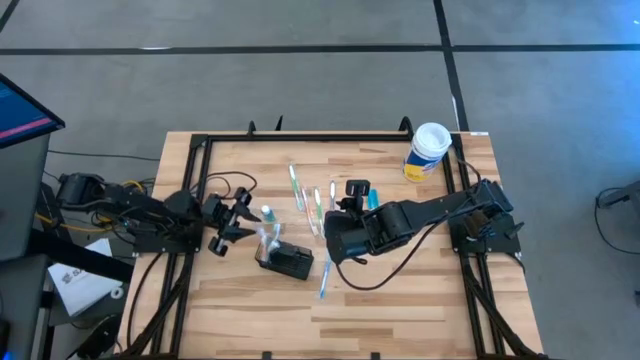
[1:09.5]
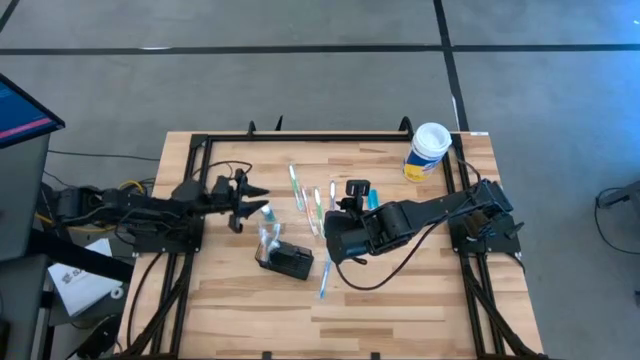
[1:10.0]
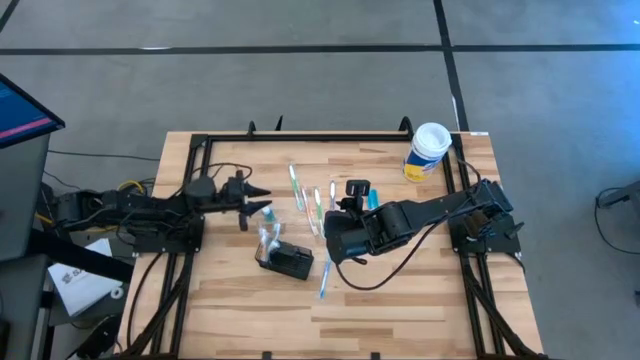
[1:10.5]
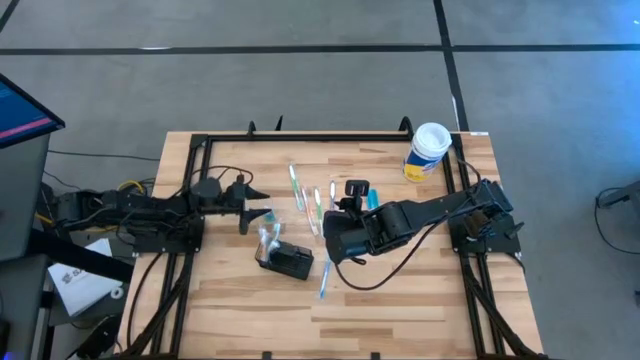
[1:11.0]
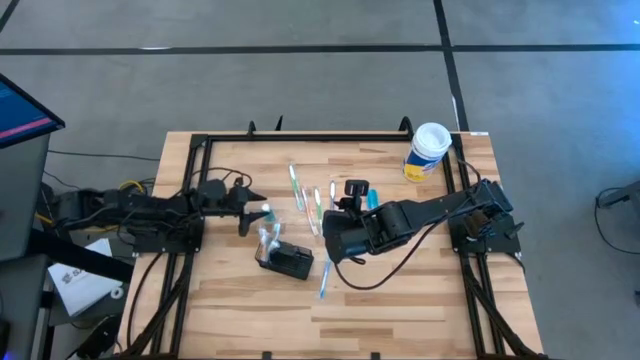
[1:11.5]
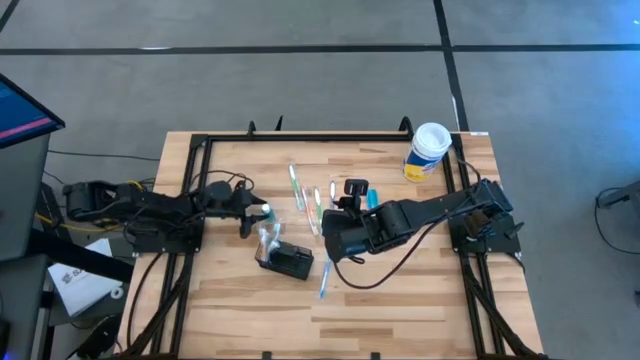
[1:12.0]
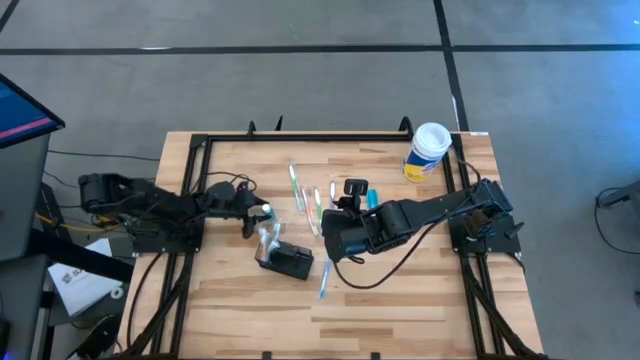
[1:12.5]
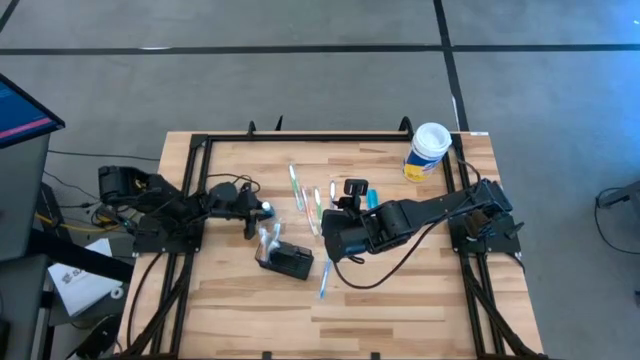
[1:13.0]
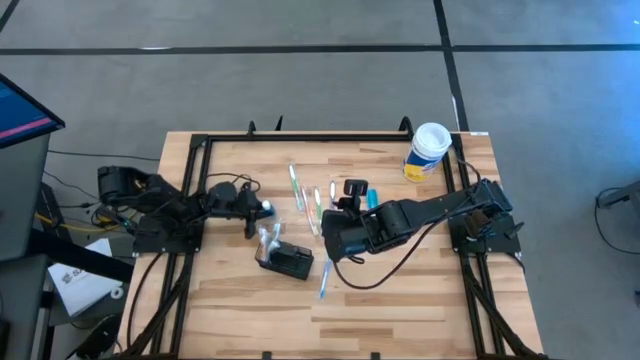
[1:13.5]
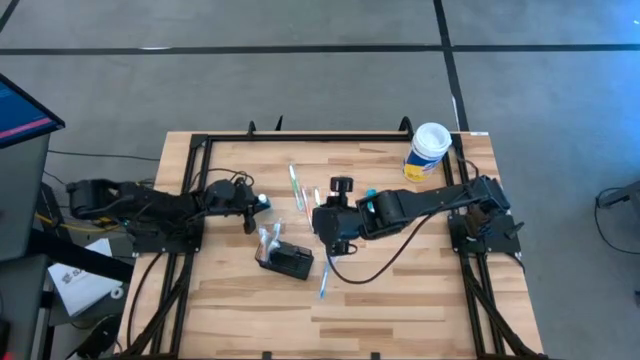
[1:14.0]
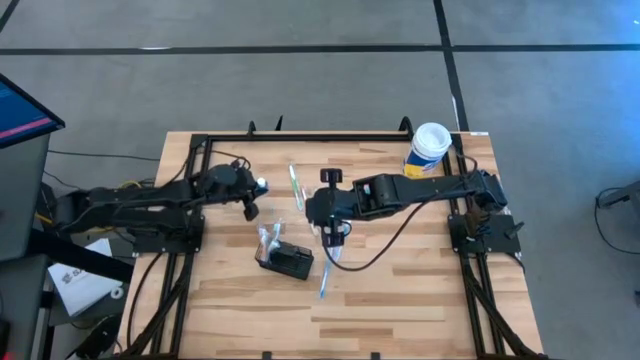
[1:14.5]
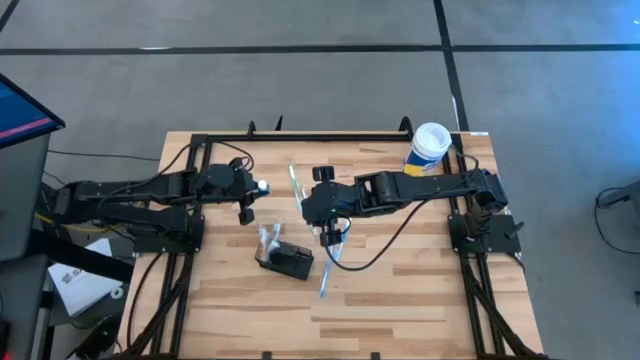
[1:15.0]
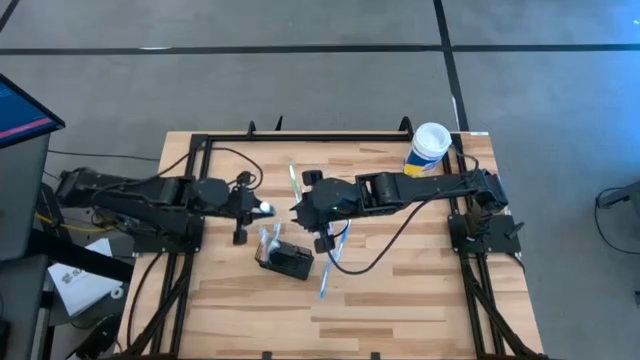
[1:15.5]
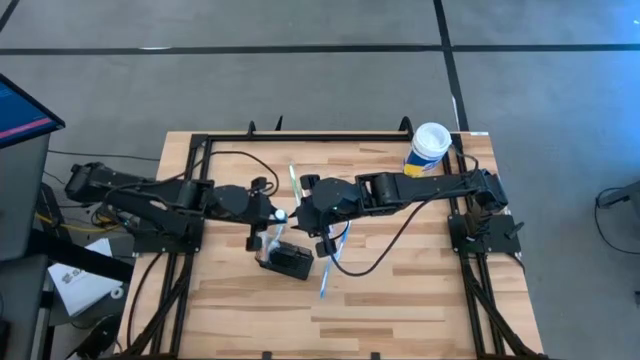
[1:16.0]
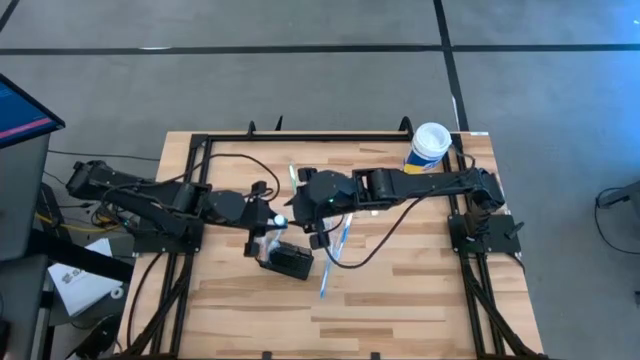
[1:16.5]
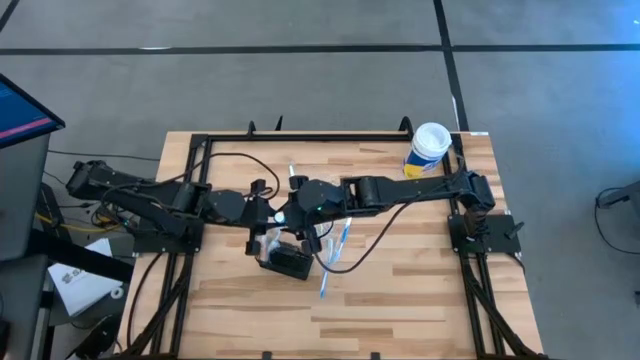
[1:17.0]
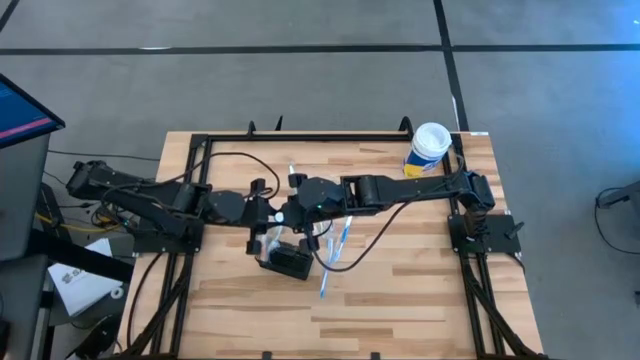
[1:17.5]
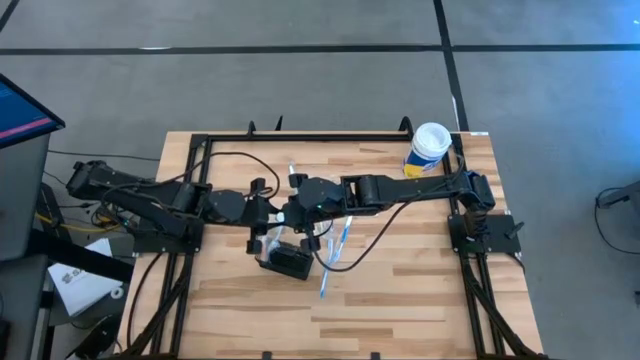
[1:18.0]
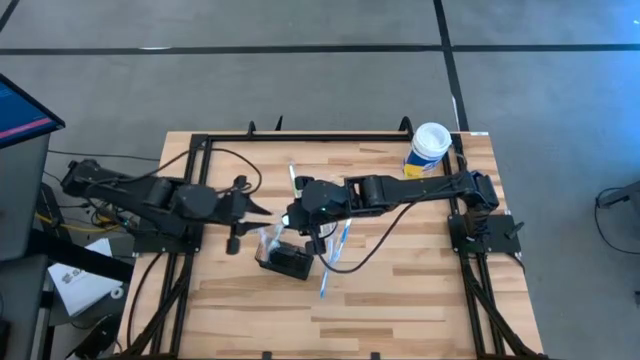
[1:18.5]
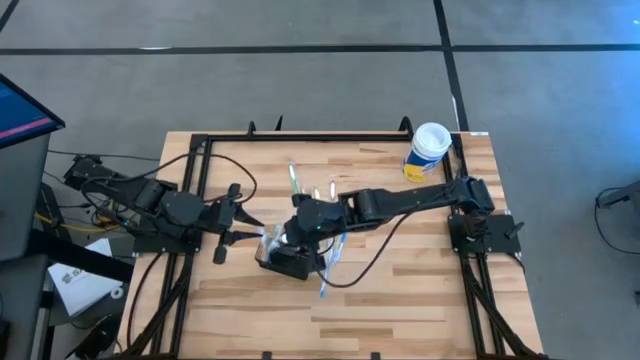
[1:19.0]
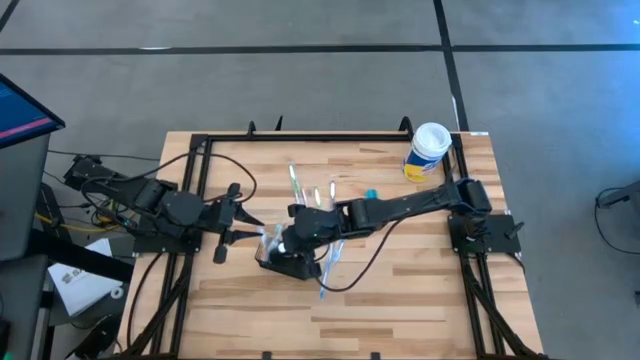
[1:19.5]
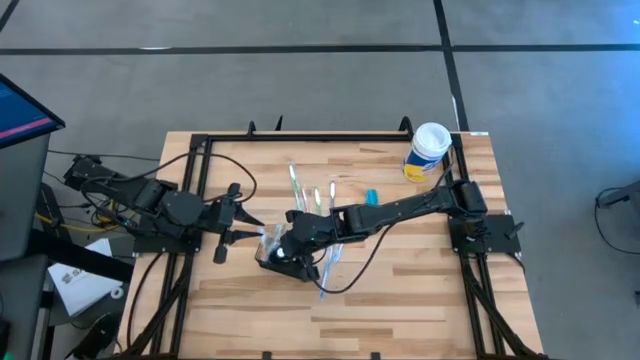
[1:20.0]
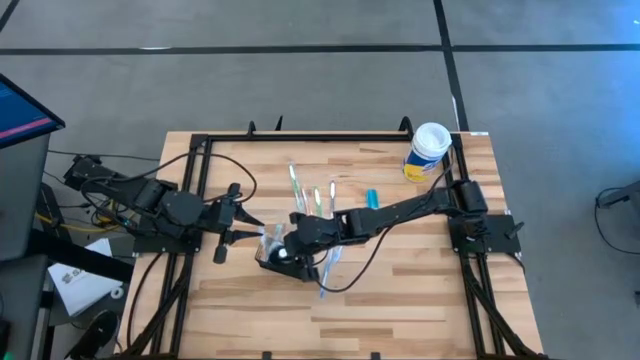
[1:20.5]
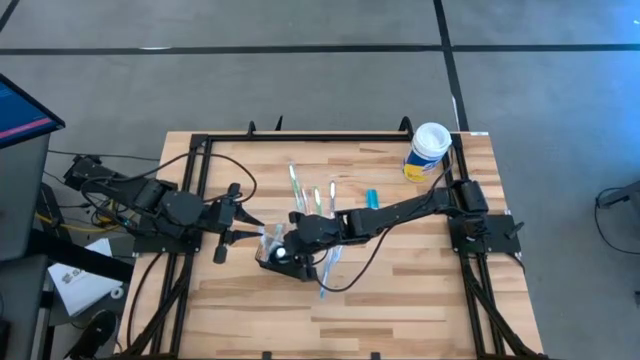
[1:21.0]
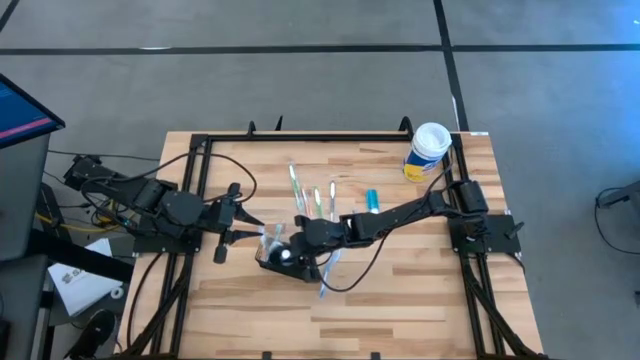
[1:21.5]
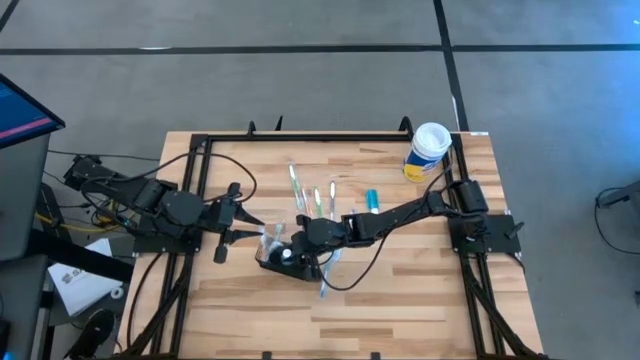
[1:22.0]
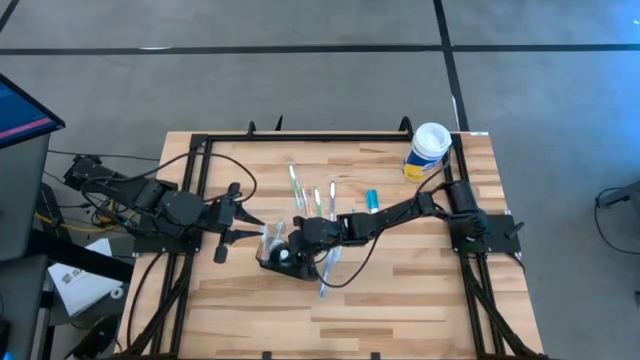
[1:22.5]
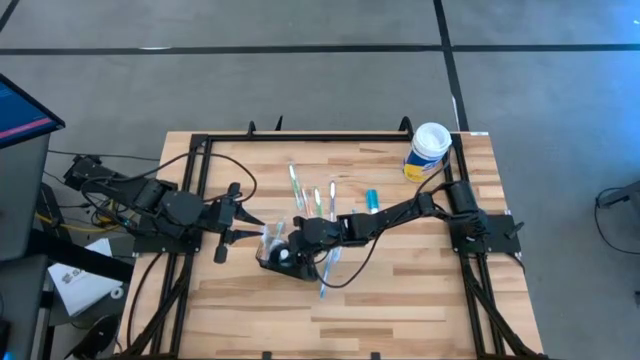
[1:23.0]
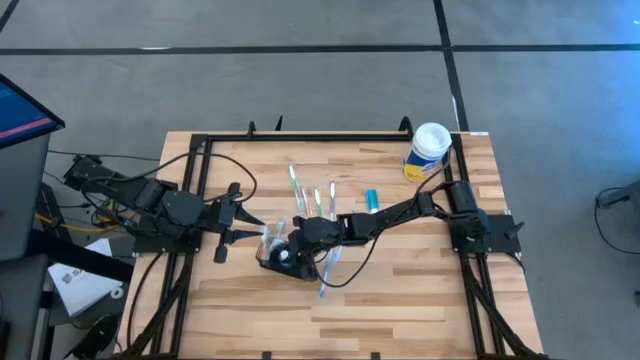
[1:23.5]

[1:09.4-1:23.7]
Task: Pick & Place toothbrushing station
Put the left blue mouthwash into the wire organizer

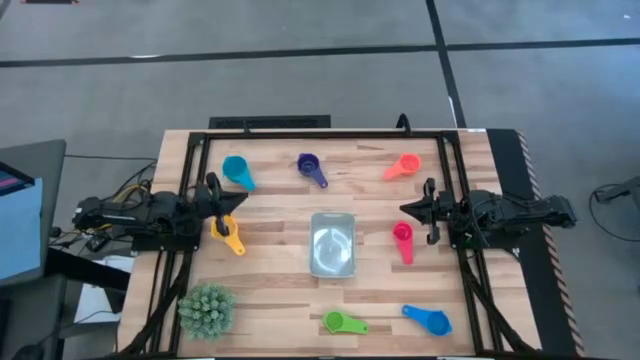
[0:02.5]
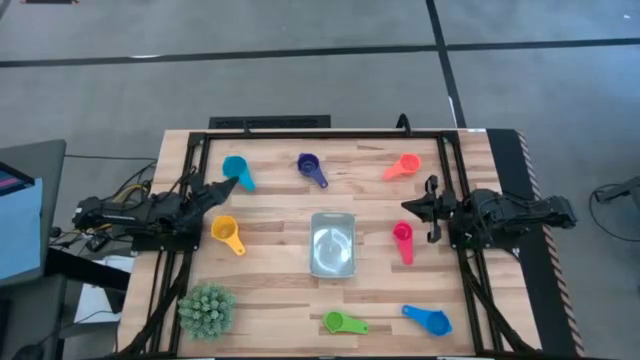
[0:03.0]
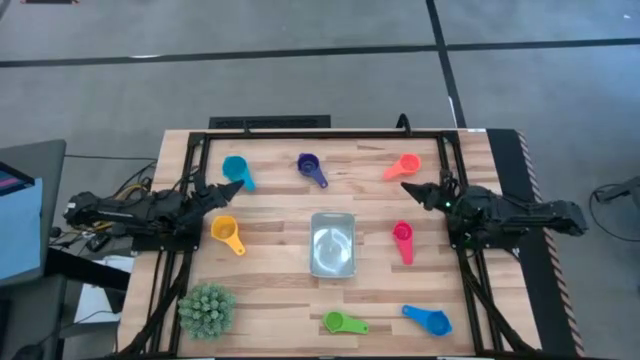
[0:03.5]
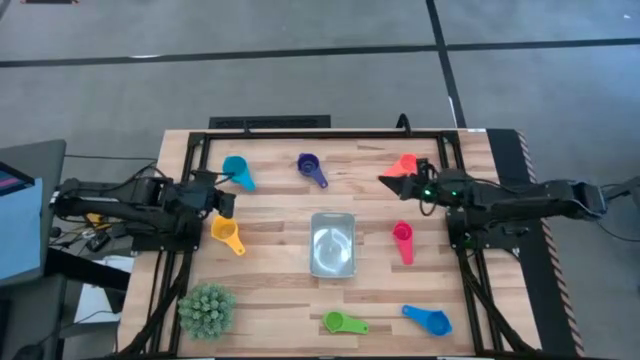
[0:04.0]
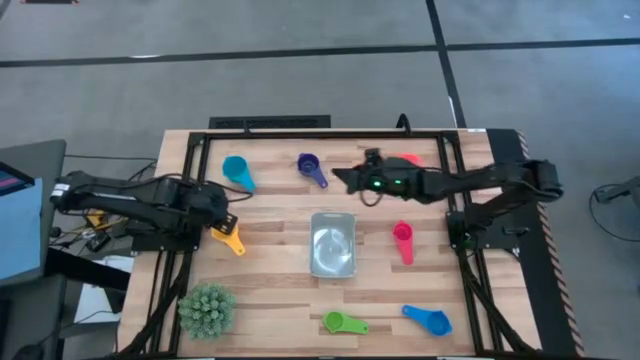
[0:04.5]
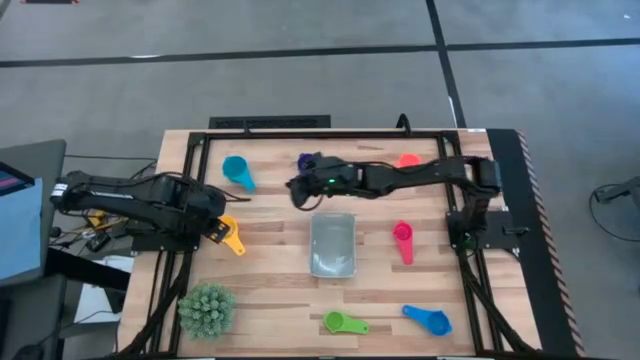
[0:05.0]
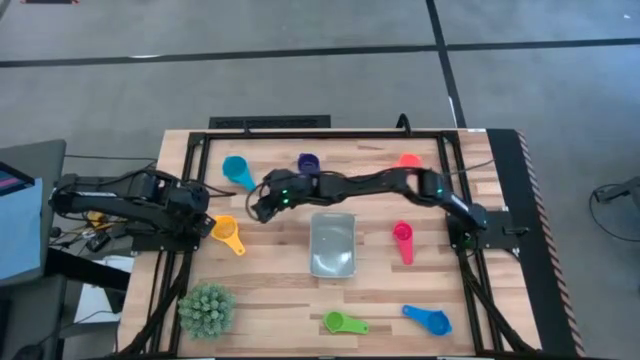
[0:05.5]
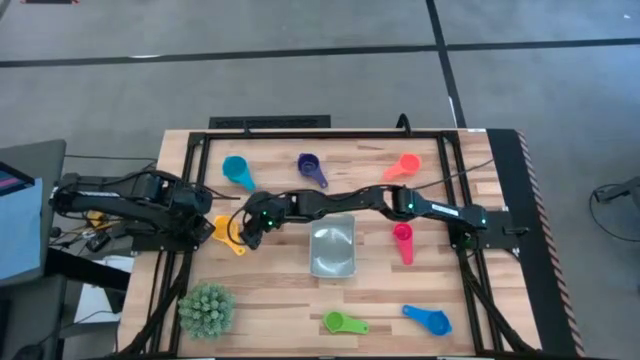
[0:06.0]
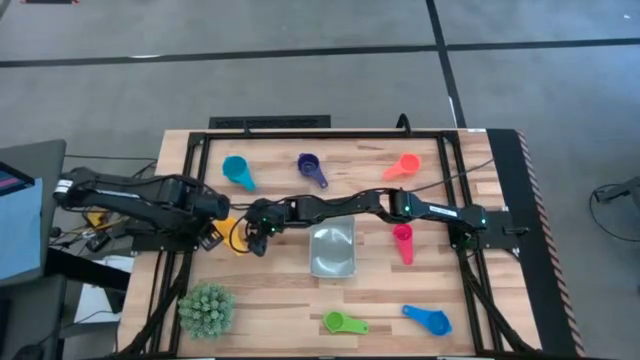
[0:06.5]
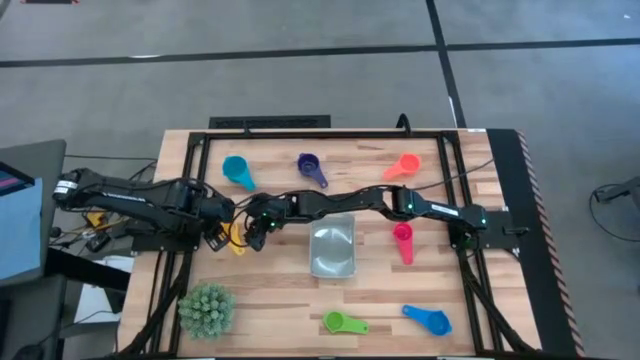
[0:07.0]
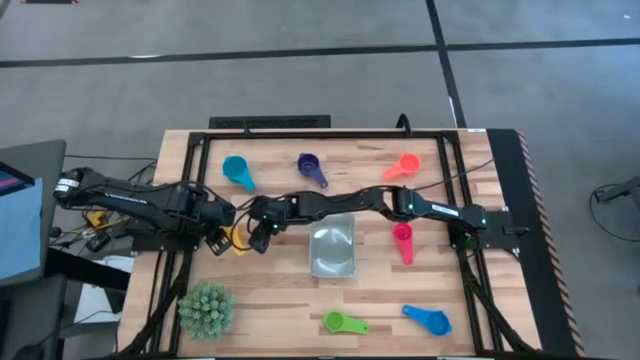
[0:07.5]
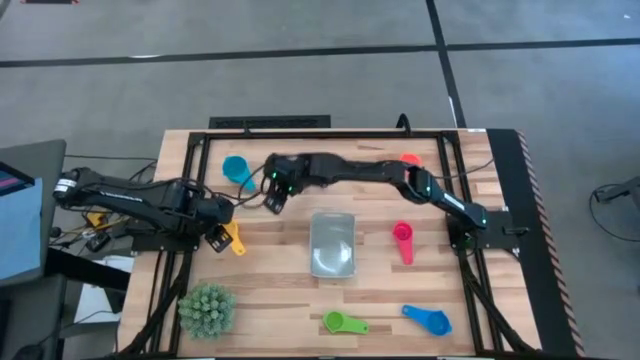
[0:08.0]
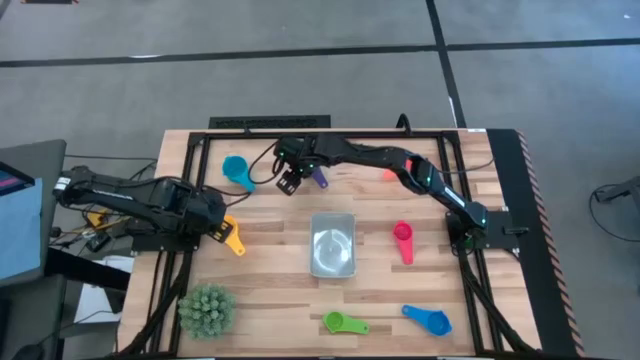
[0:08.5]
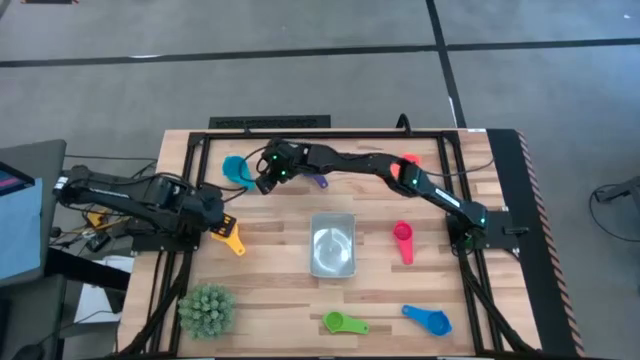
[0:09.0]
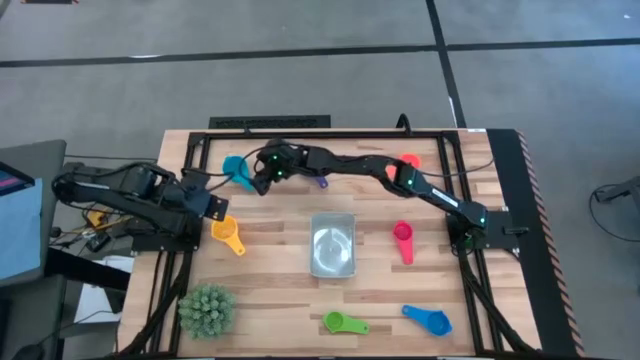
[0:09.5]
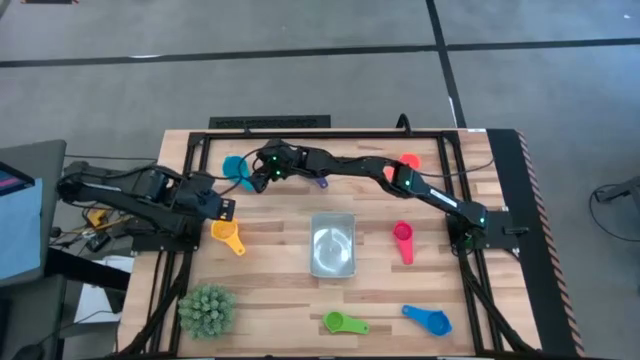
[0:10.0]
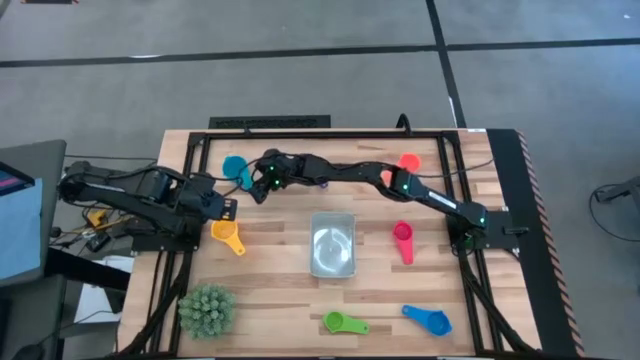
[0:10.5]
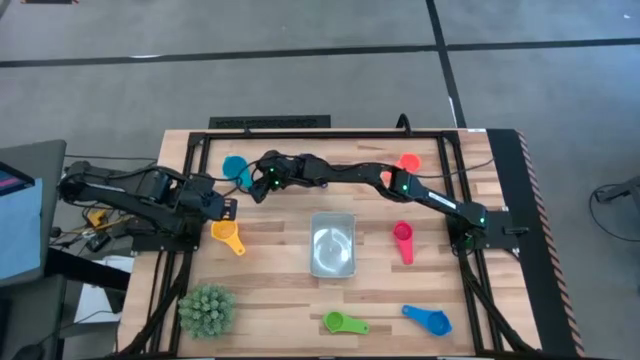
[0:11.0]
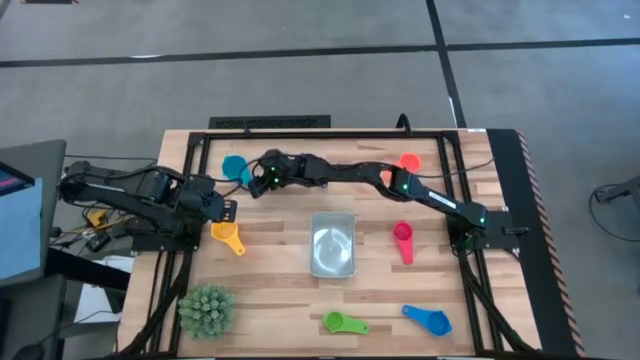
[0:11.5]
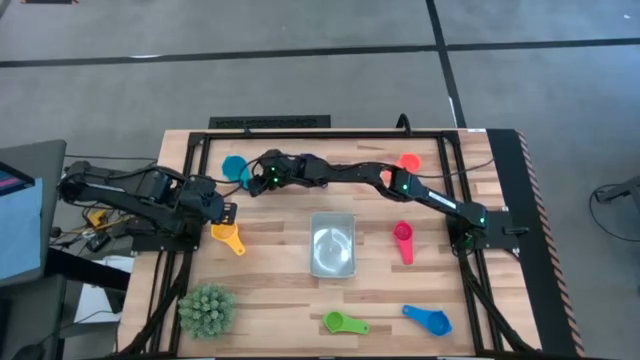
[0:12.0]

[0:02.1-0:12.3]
Task: Nest measuring cups in basket
Stack the yellow measuring cup on top of the light blue measuring cup
